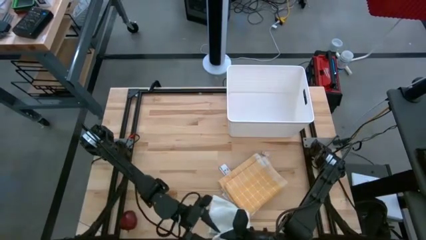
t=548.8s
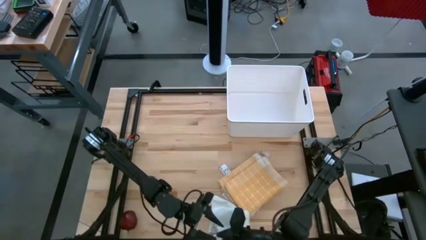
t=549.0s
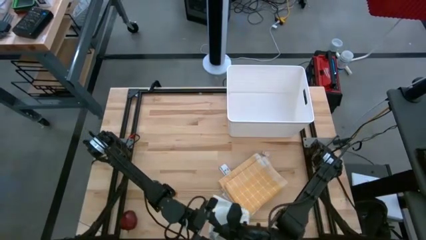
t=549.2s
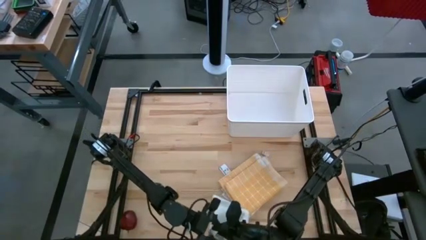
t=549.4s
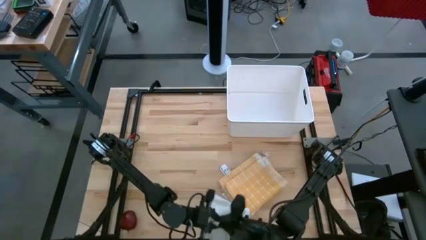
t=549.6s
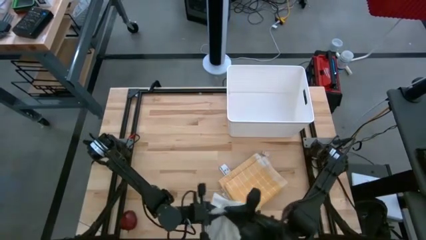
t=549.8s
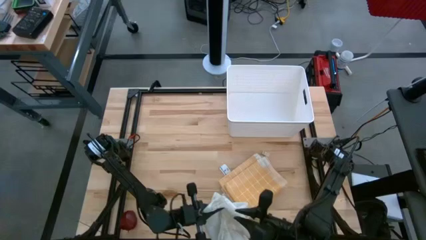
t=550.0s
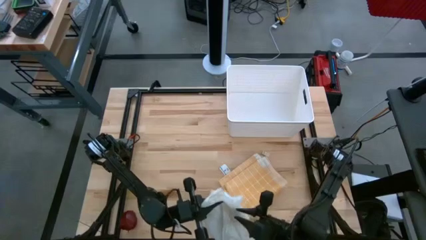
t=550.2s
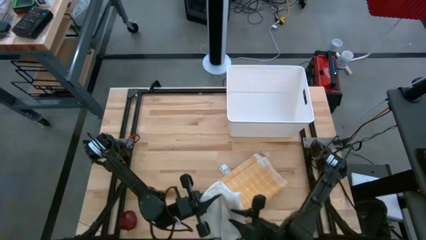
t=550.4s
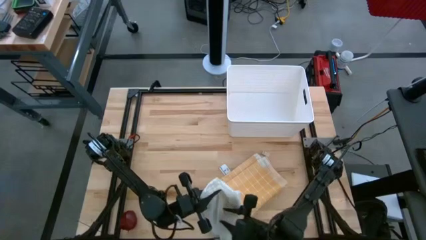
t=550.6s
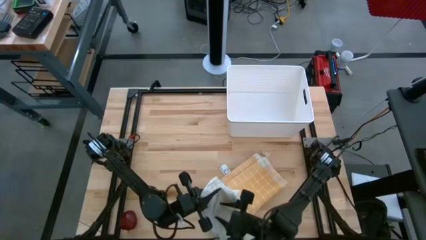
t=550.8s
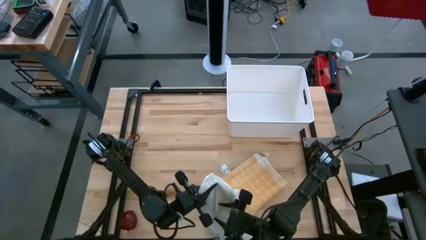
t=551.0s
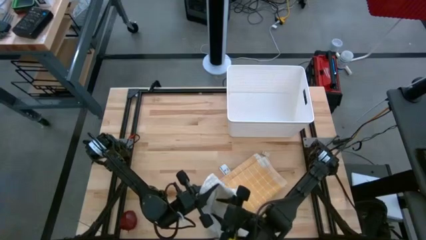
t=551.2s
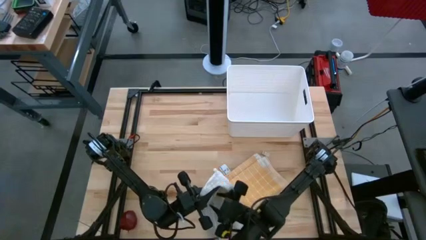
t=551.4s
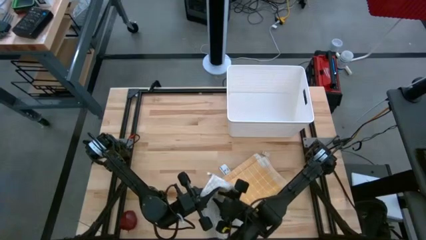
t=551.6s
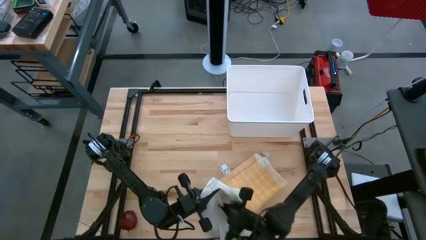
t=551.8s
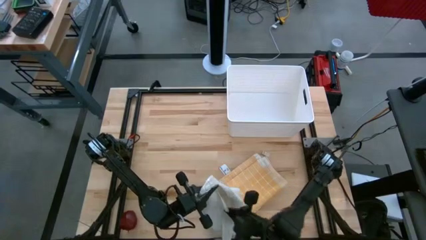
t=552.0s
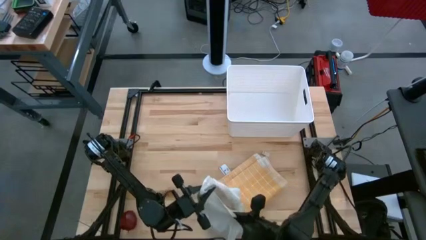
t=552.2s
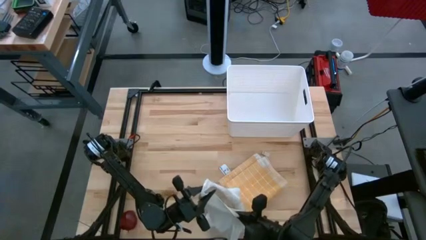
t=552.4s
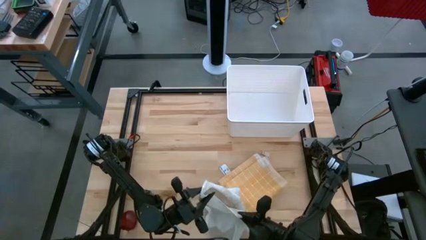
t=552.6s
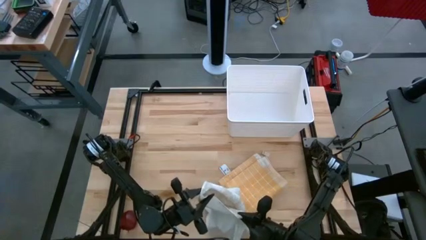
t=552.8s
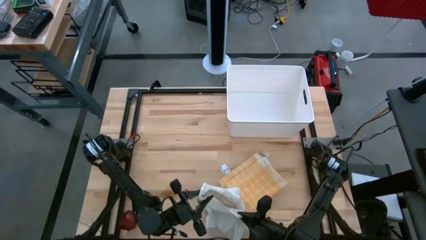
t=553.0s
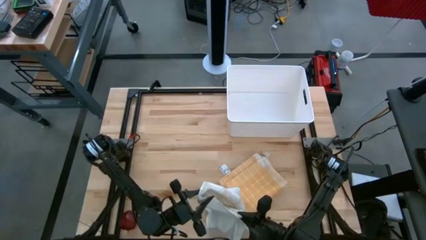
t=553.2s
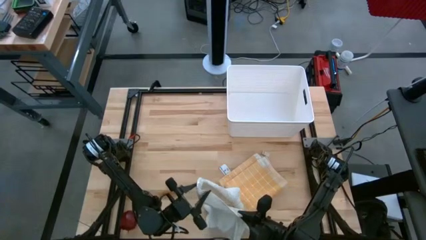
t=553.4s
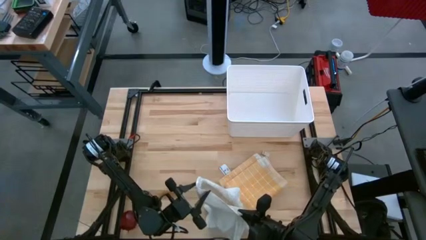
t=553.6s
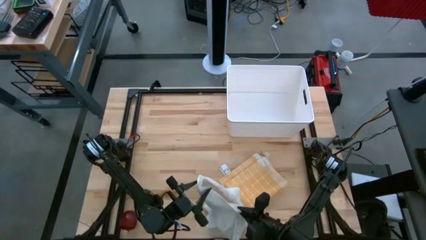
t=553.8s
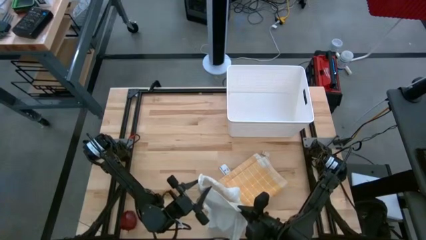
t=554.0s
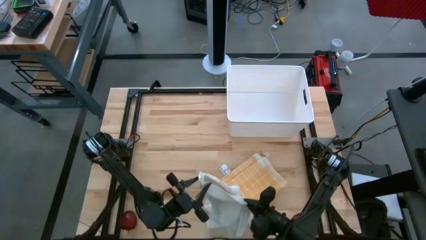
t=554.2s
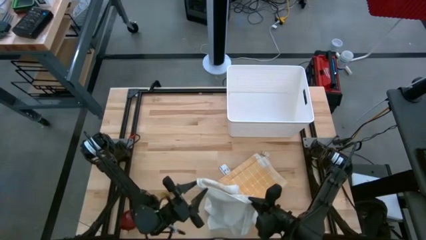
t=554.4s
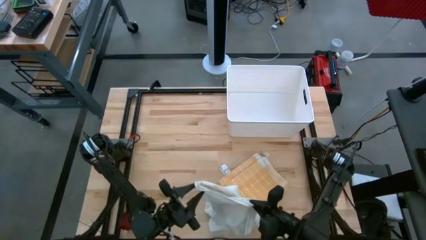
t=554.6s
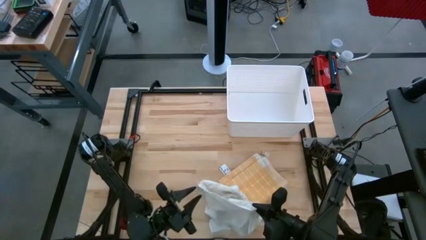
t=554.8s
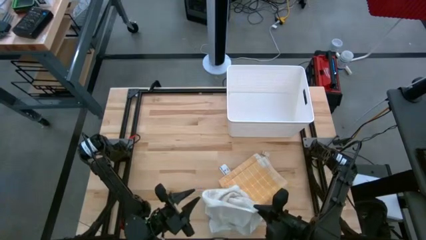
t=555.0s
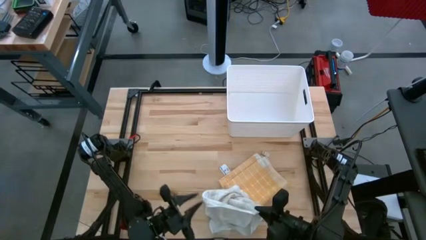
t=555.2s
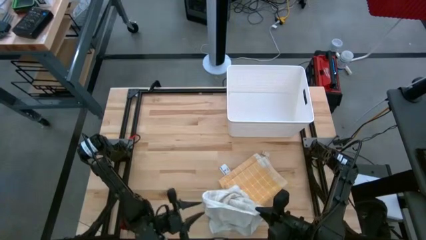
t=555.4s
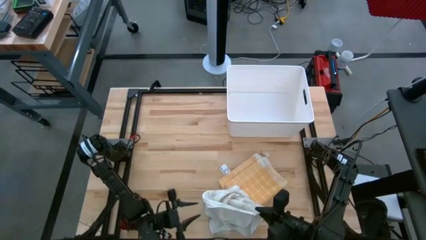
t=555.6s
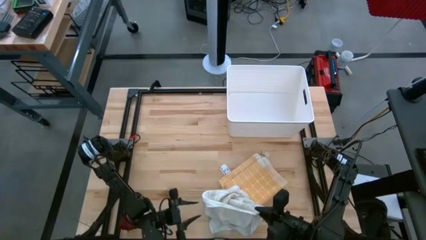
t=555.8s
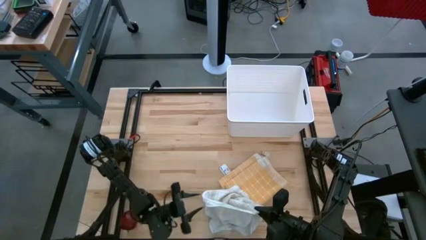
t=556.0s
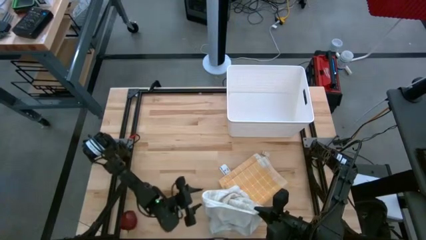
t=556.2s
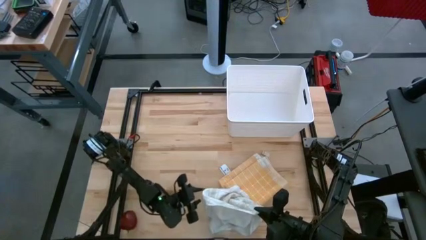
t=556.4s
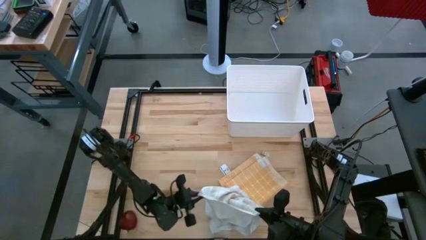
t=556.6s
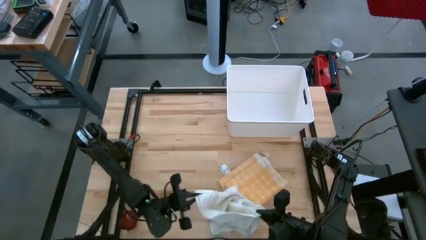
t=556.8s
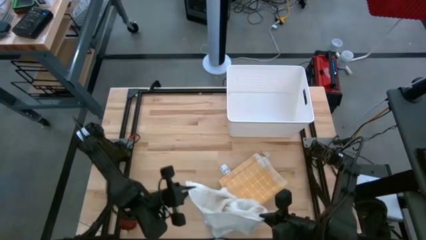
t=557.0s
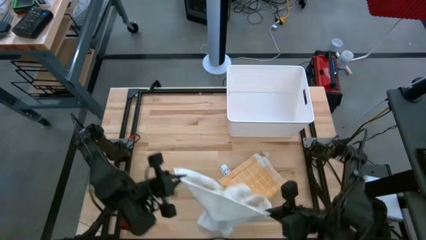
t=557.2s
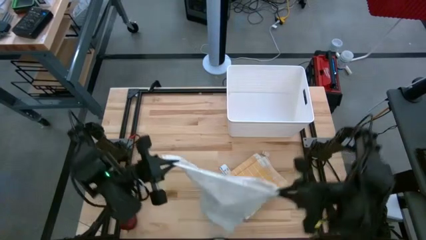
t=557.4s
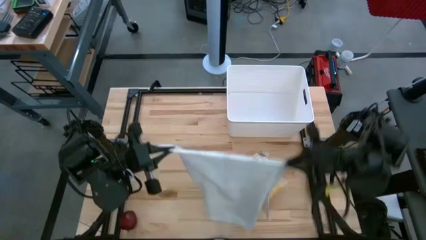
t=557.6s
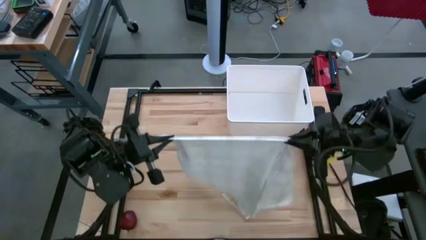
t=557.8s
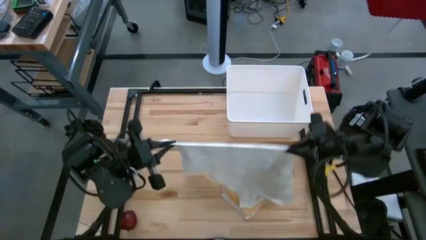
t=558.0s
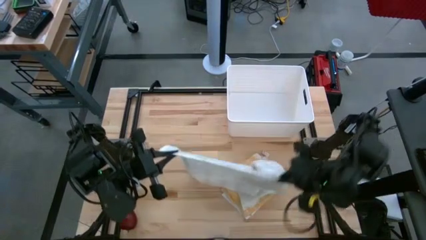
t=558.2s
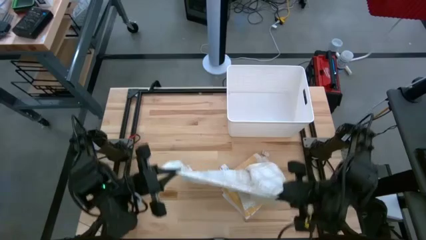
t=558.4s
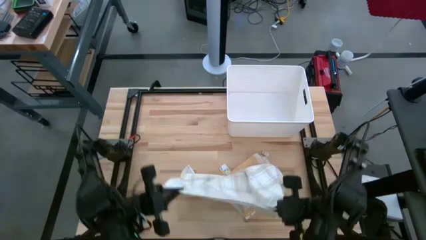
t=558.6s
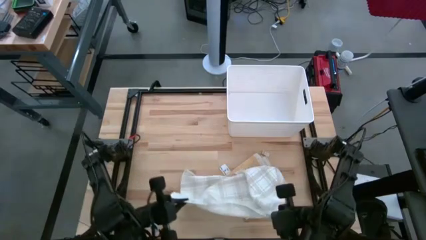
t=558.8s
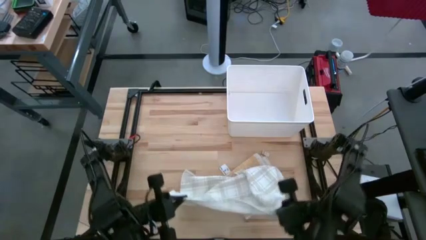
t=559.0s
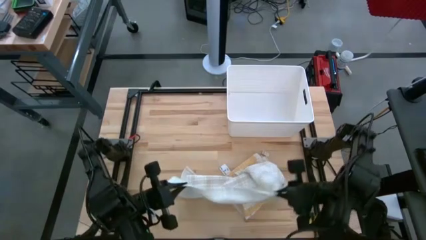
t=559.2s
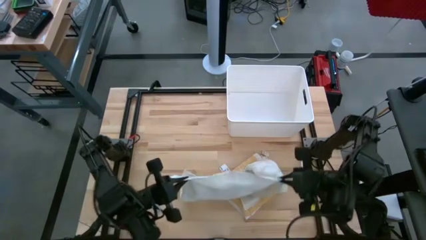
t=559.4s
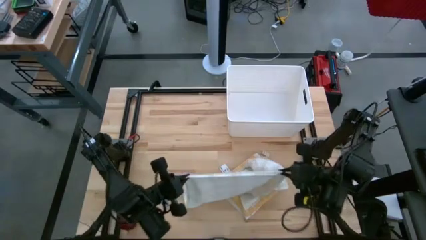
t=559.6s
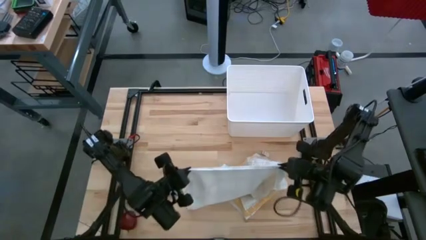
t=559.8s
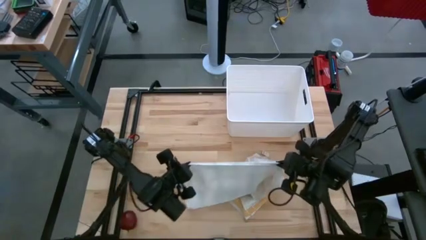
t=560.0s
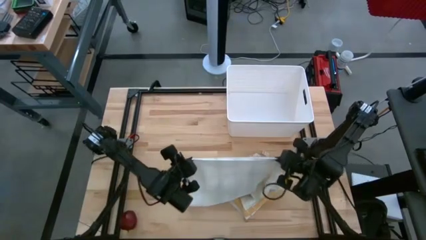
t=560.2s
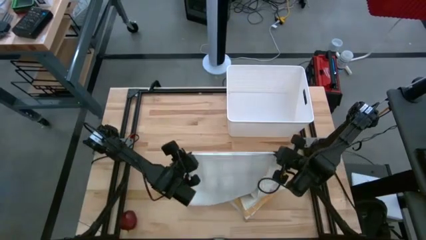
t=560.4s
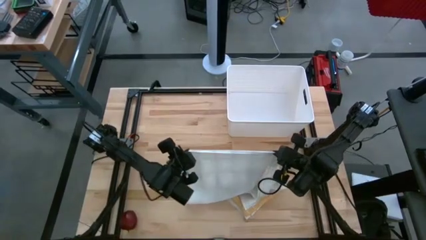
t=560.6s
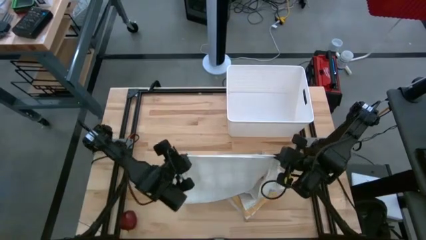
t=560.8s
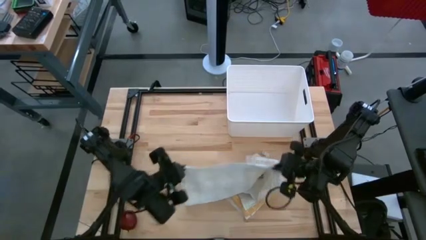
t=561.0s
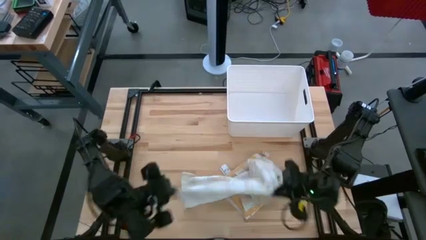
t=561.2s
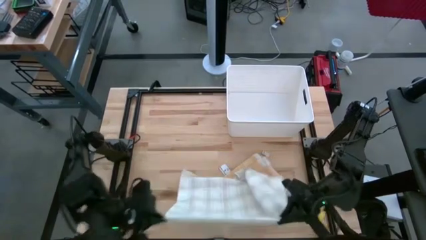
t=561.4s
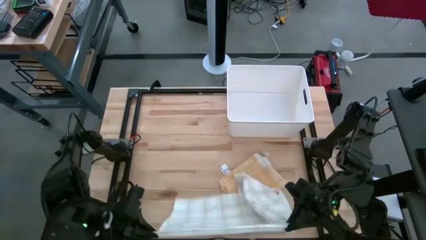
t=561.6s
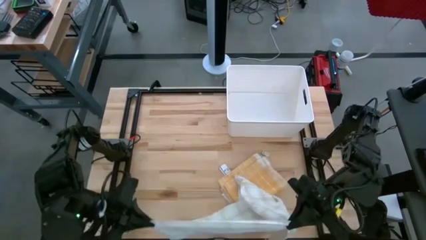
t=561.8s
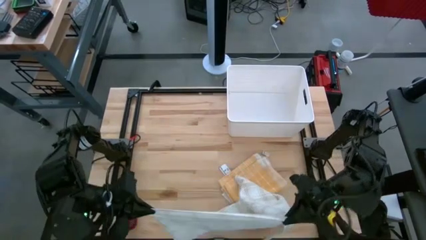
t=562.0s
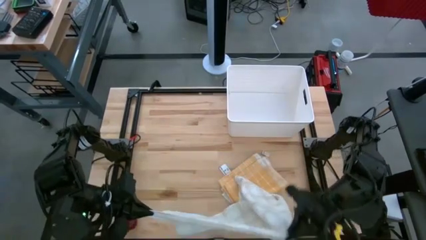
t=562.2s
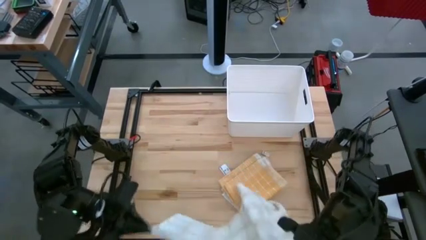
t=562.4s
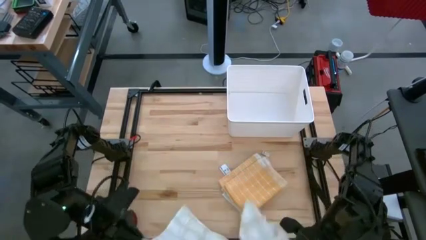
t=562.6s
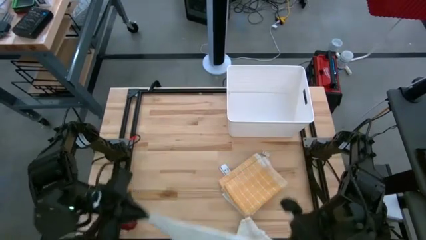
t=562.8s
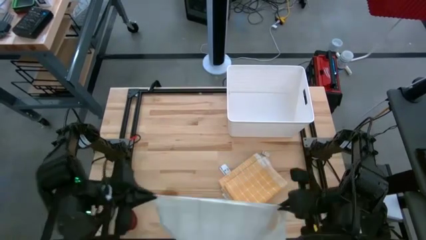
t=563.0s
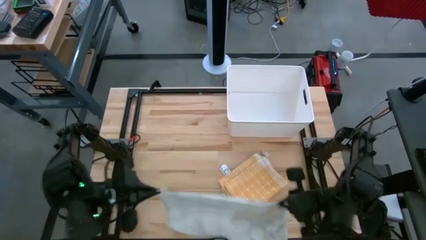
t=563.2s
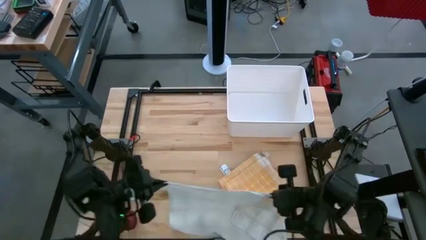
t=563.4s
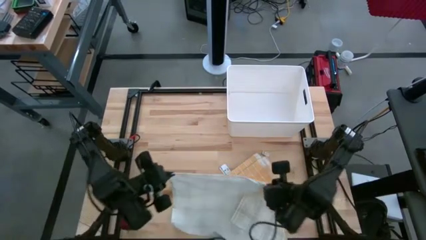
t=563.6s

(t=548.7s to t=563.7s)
Task: Fold towel
Fold the white checkered towel

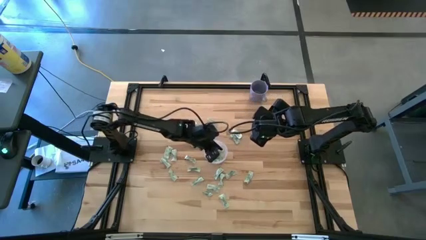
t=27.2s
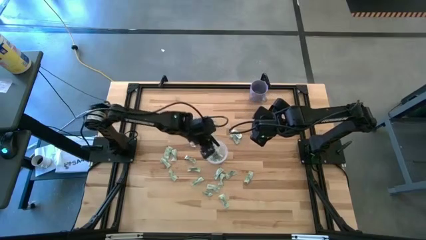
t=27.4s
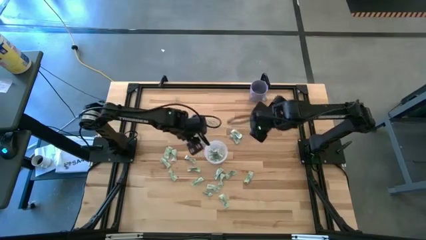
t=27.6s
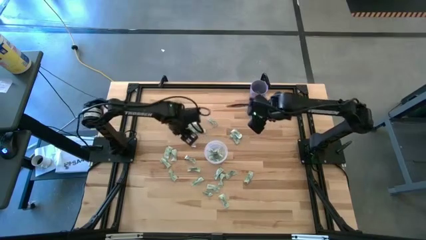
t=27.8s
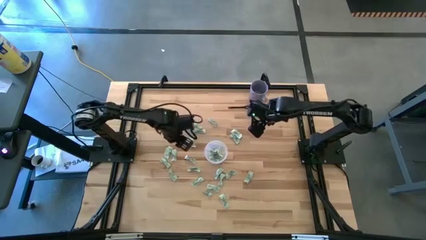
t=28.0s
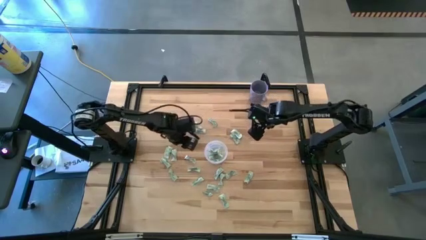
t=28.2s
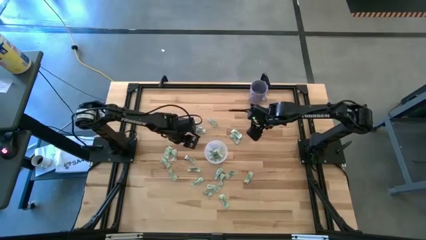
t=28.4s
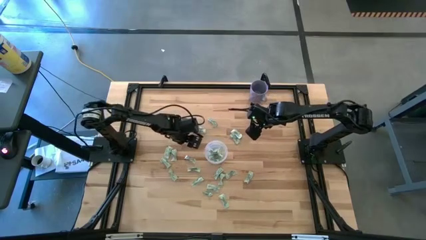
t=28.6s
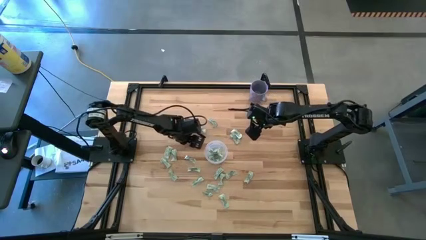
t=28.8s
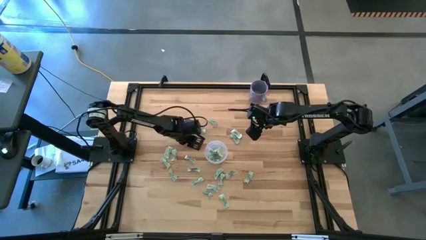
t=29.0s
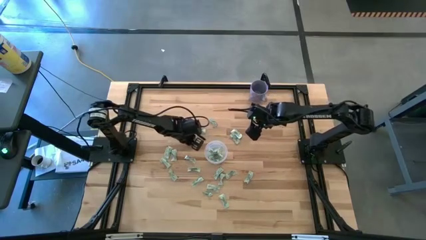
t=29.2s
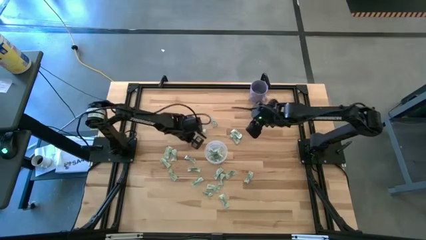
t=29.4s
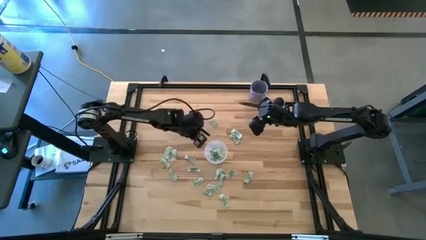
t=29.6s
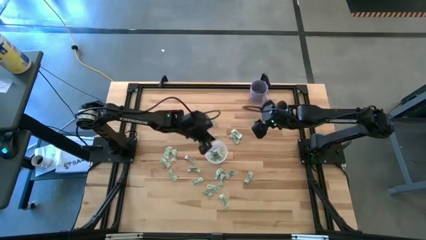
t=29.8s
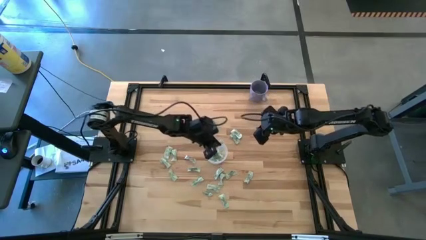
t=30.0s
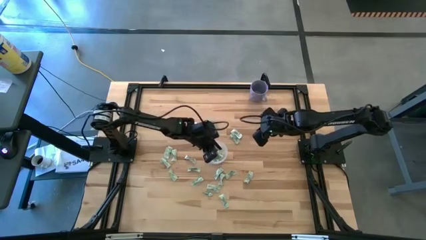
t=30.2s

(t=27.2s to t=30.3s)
Task: Pick and place Stevia / Truvia into bins
Put the green stevia packet into the transparent container
